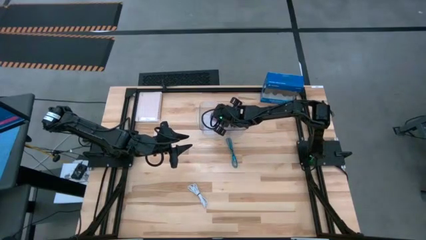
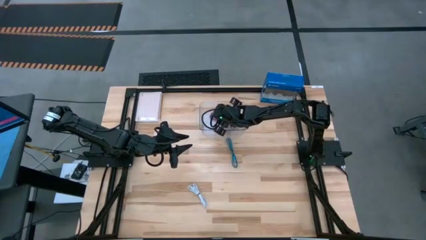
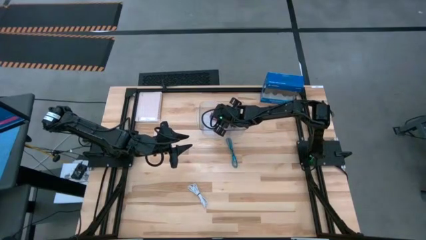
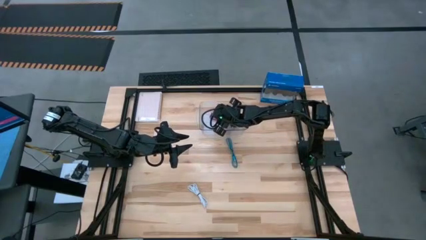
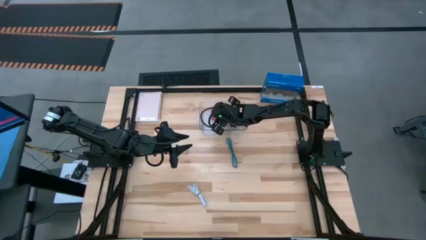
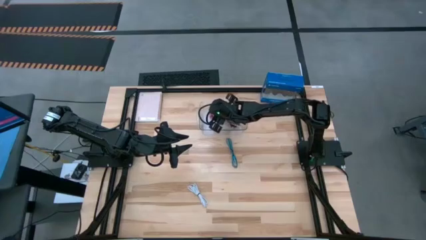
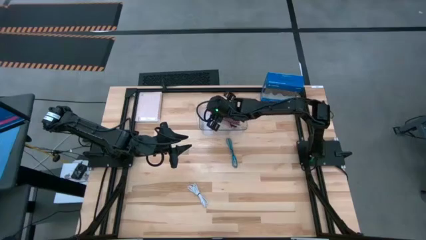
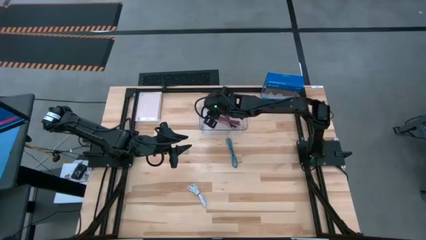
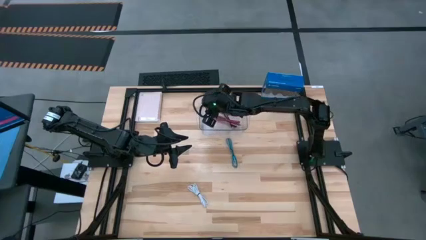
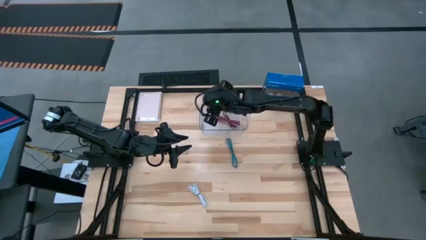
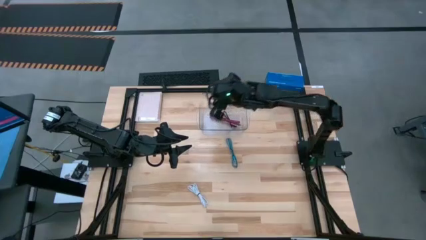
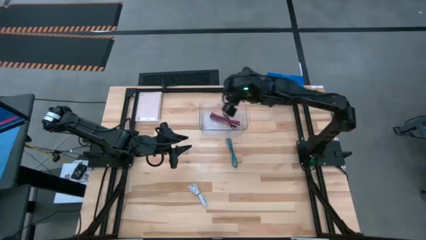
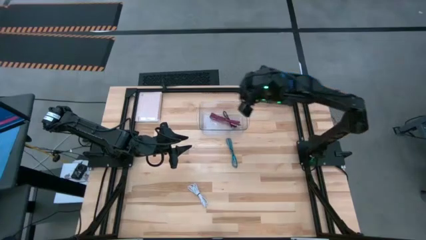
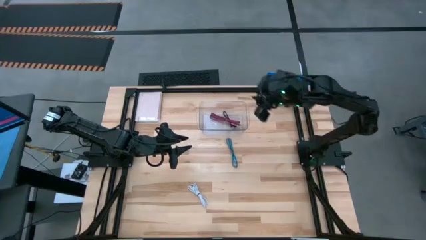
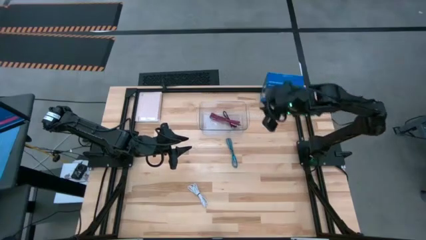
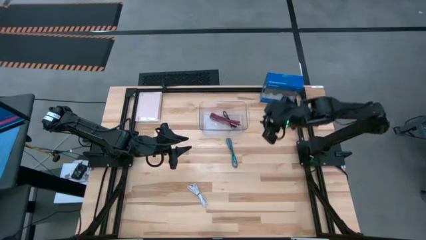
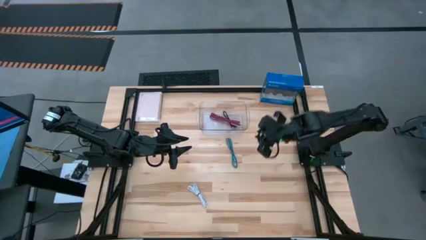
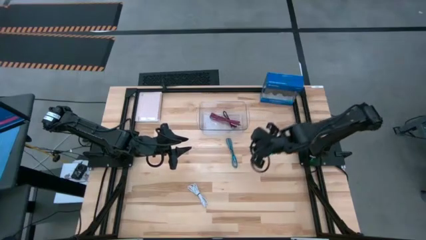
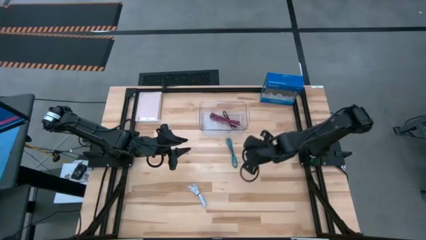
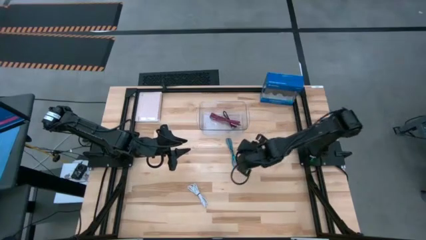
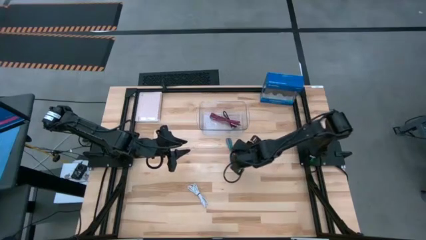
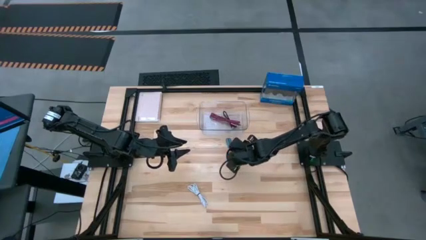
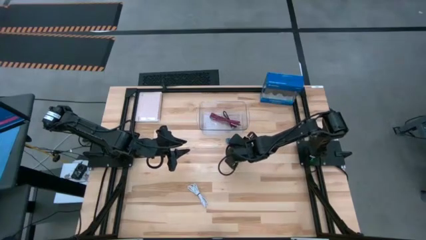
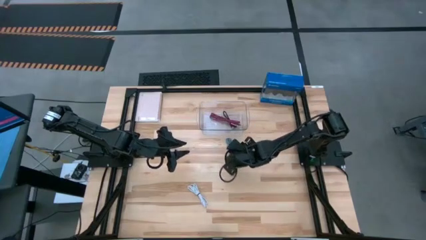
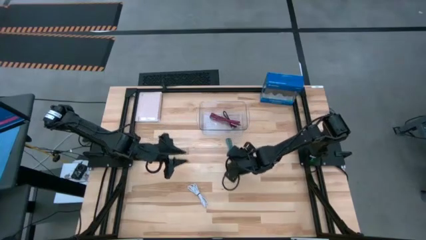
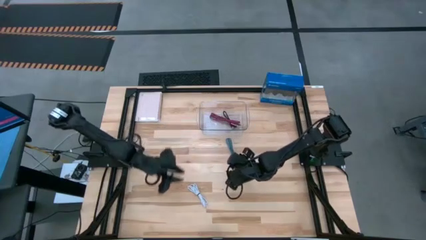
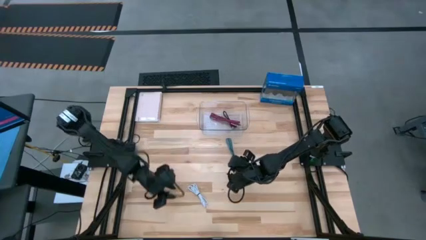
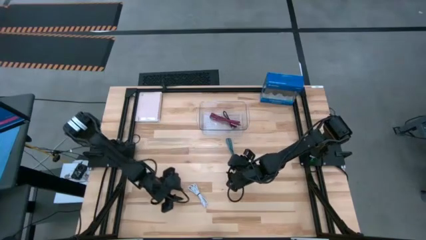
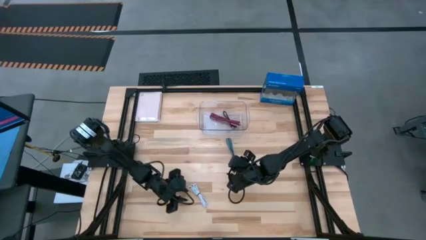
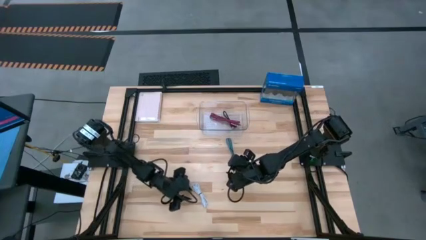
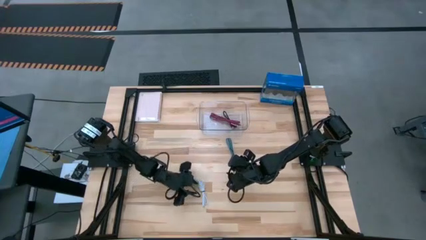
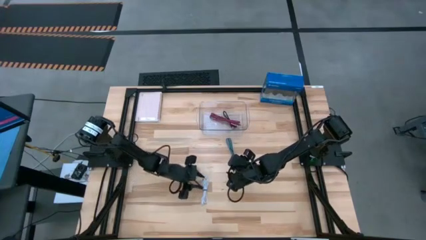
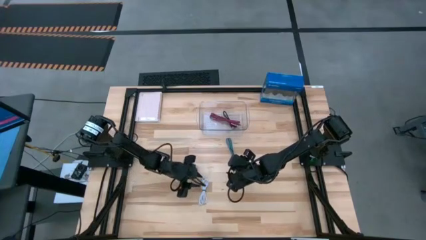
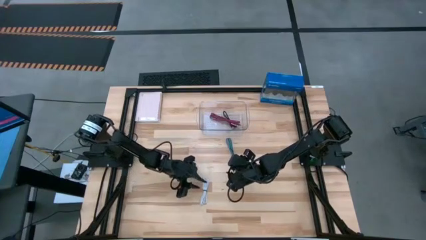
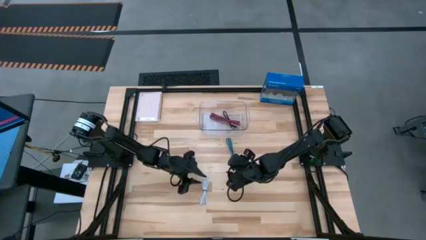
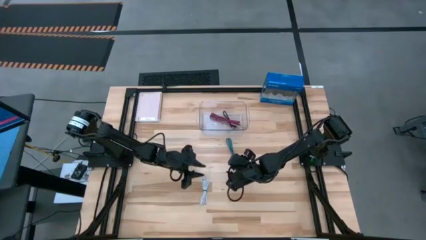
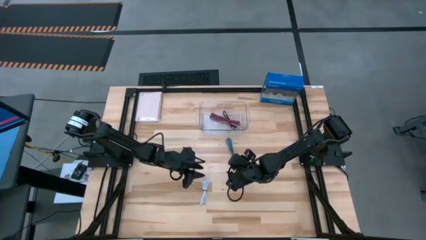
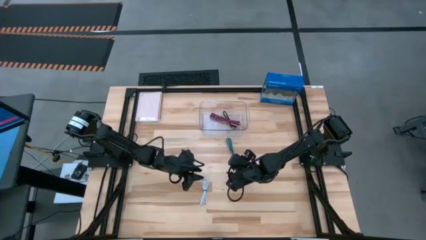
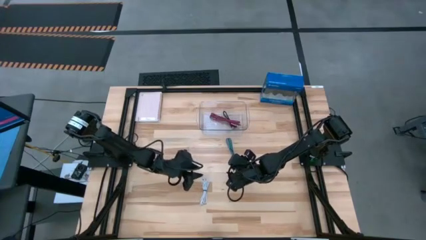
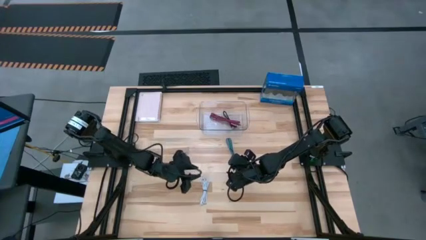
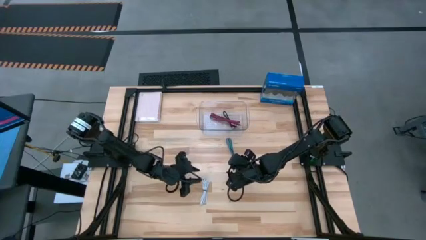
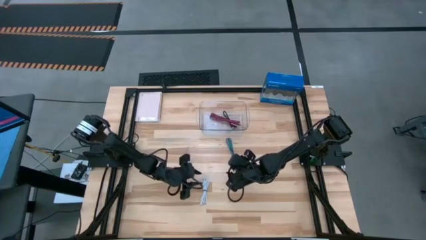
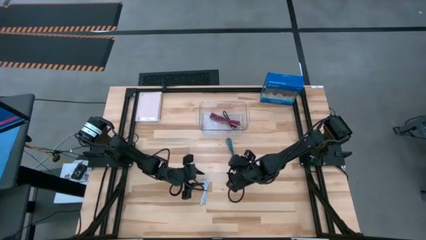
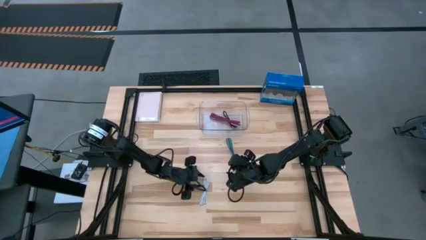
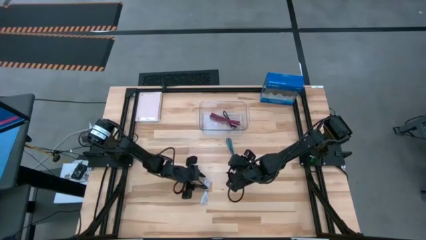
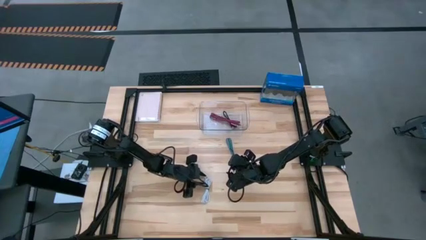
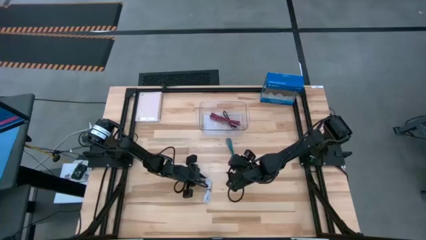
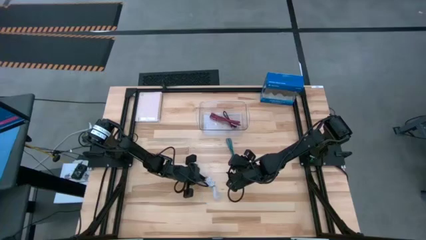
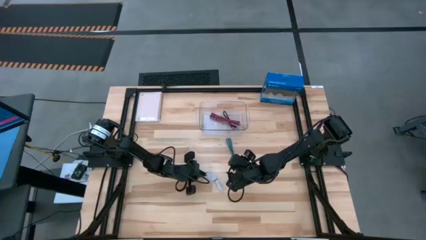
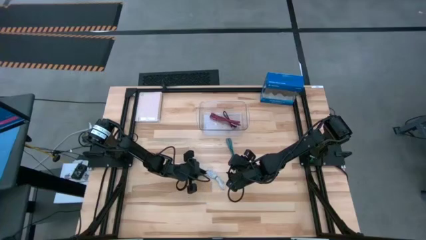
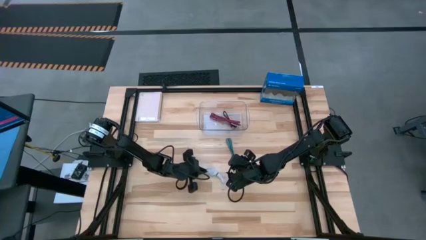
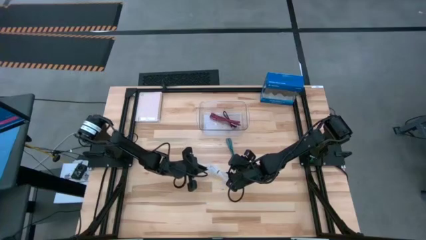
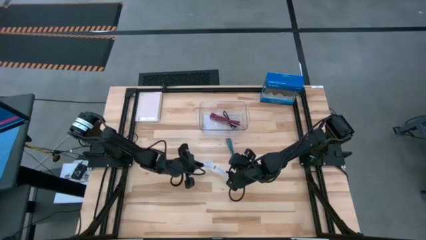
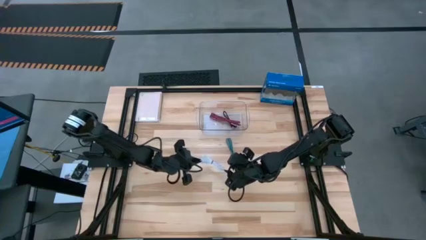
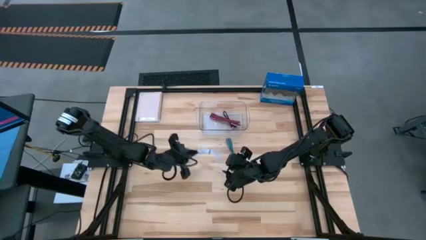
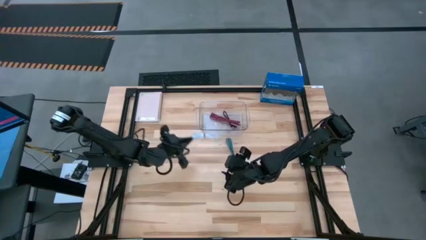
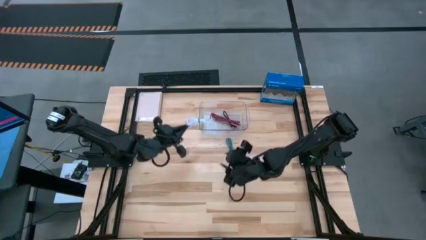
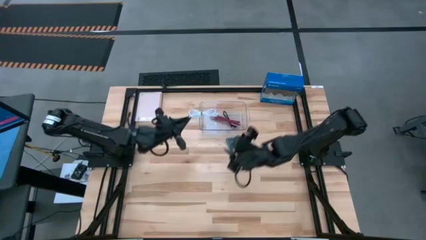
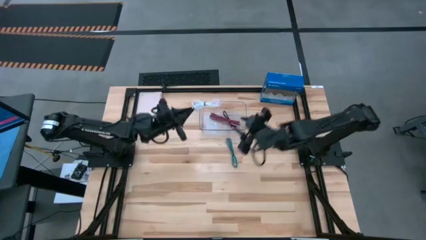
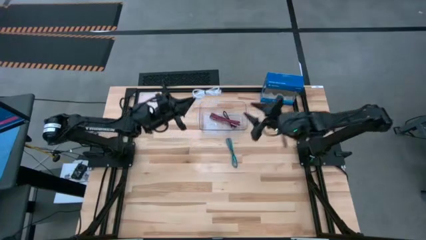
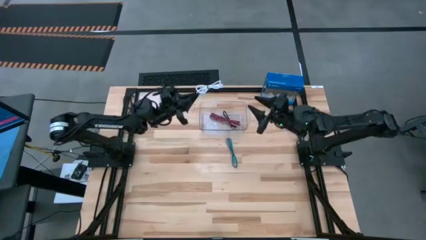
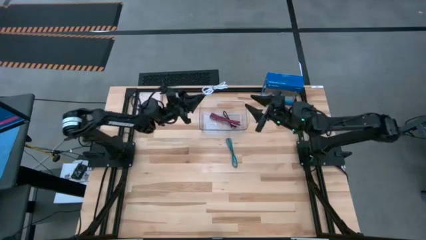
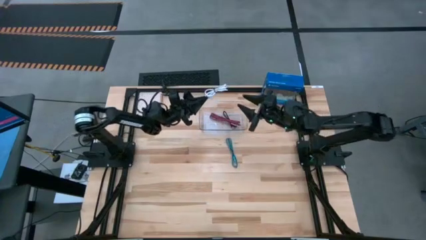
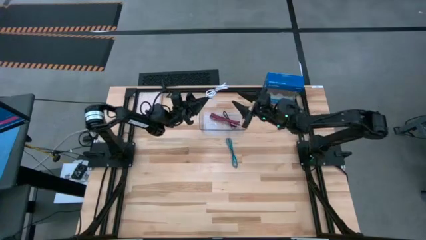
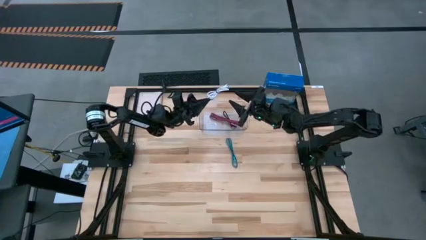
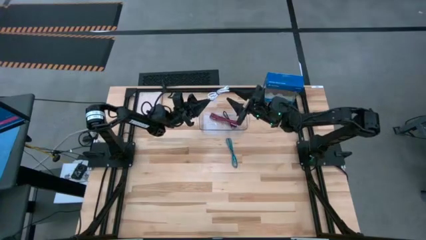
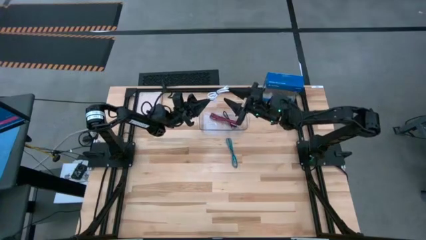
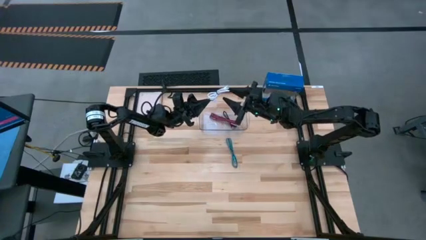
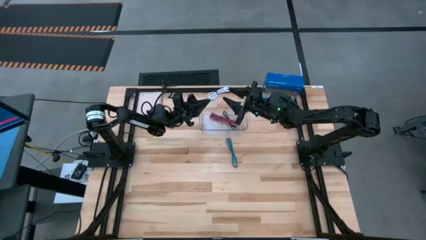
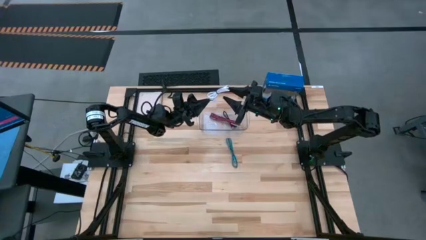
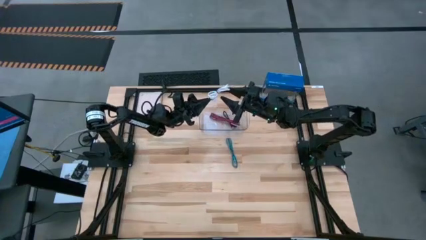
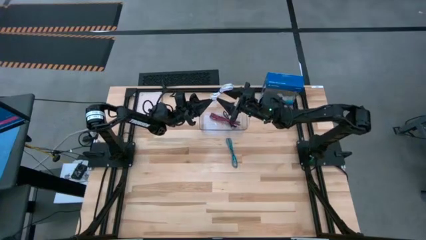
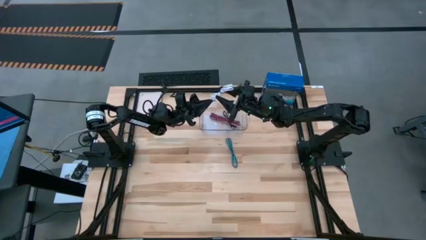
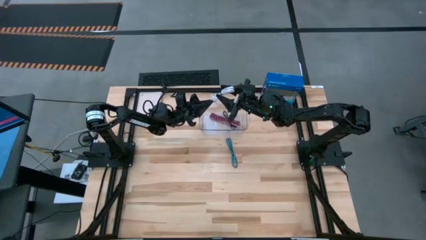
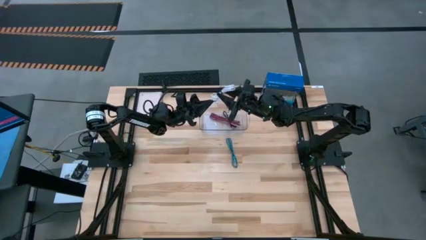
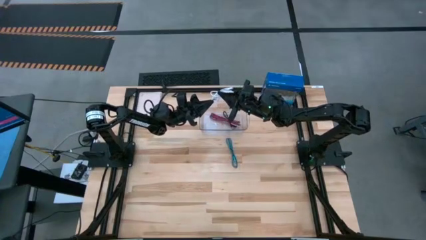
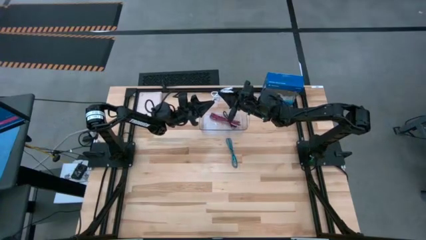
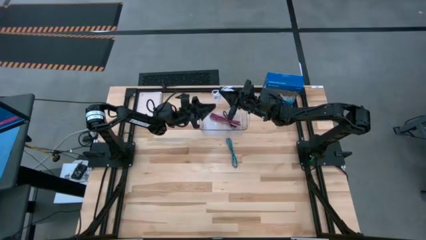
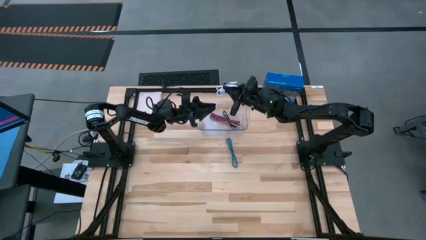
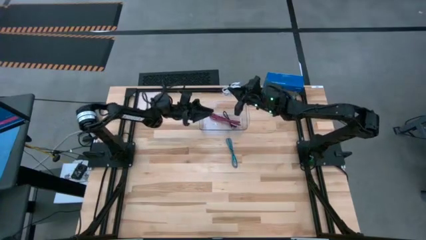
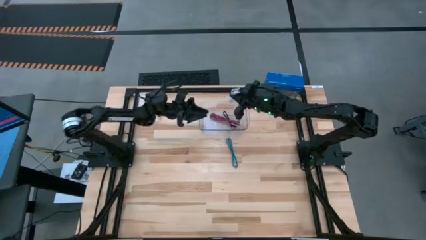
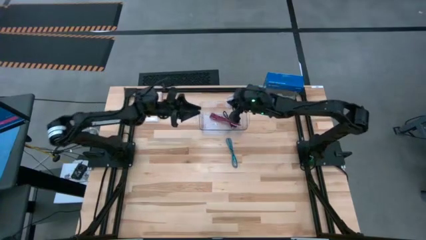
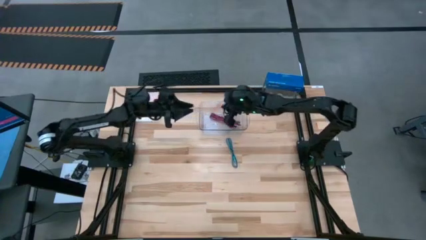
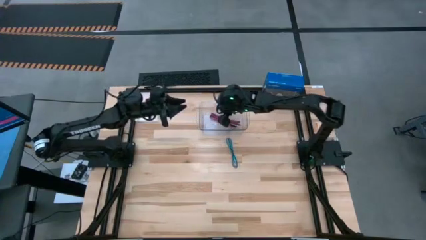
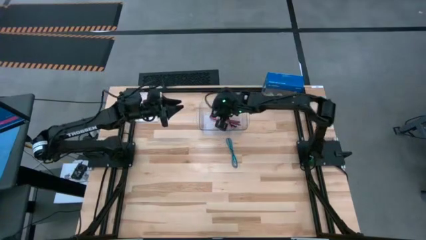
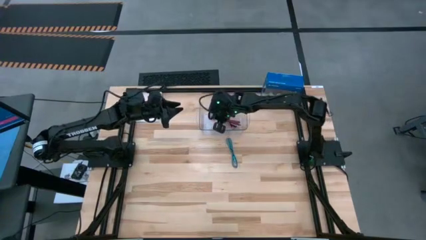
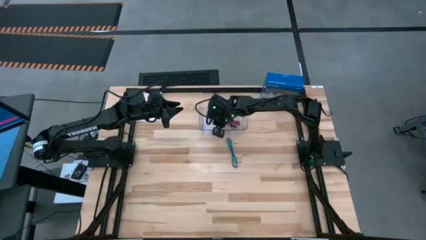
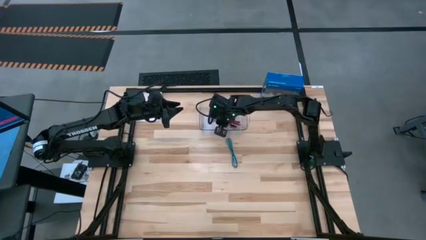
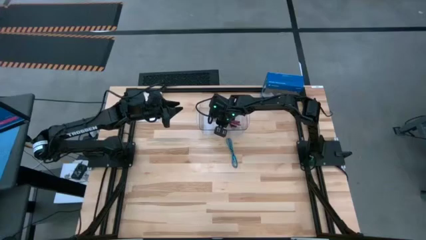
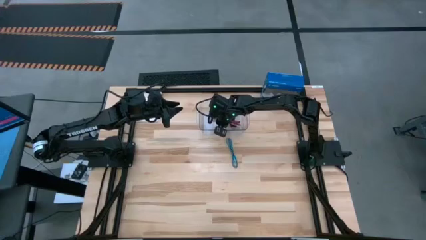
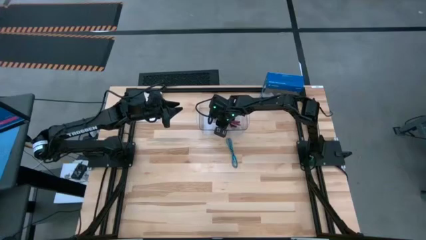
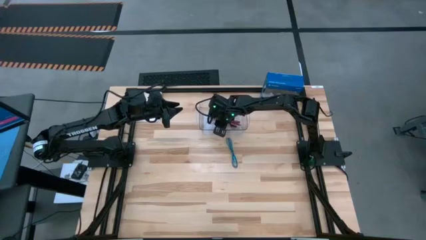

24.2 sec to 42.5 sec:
Task: Pick and place USB-C Cables
Put the white charger cable into the transparent bin
